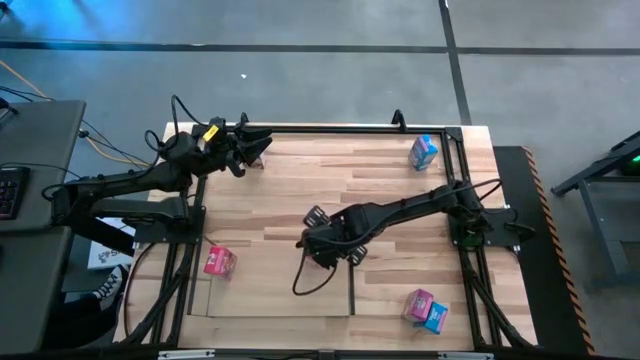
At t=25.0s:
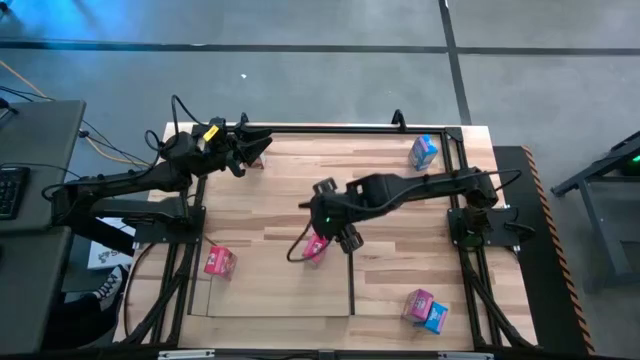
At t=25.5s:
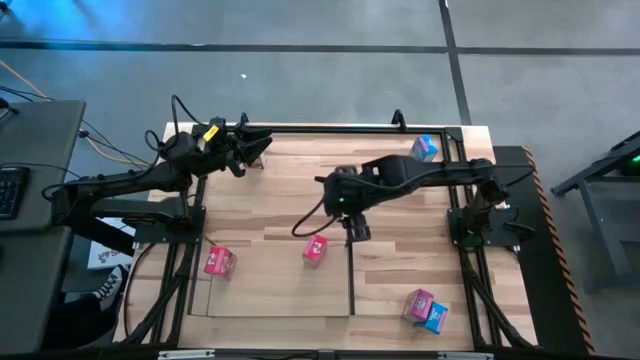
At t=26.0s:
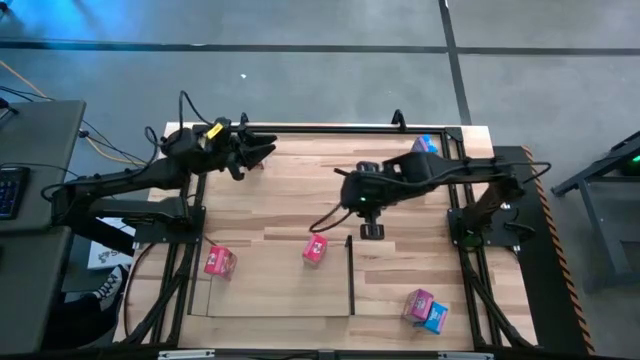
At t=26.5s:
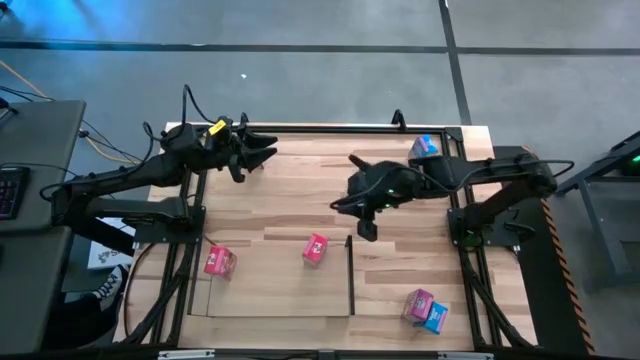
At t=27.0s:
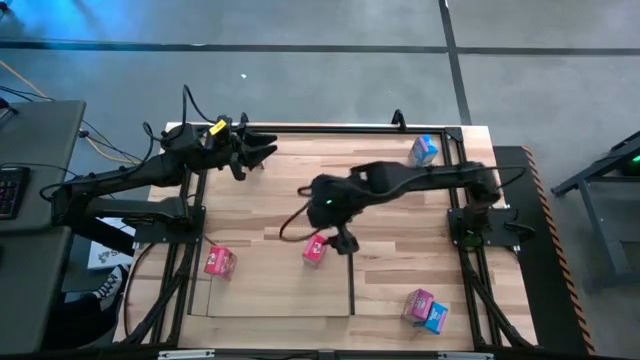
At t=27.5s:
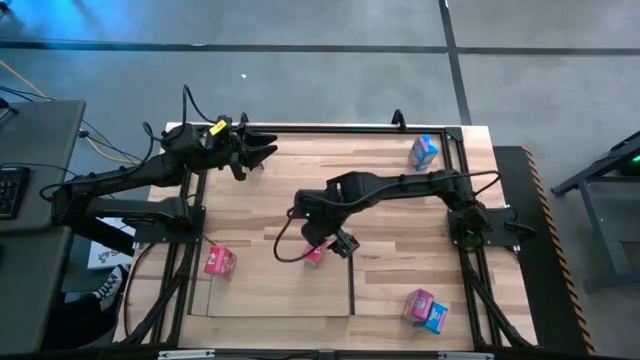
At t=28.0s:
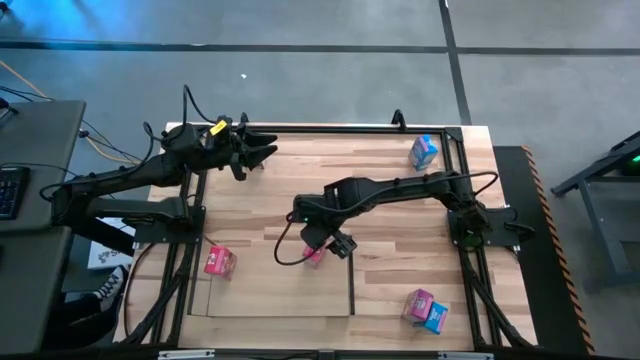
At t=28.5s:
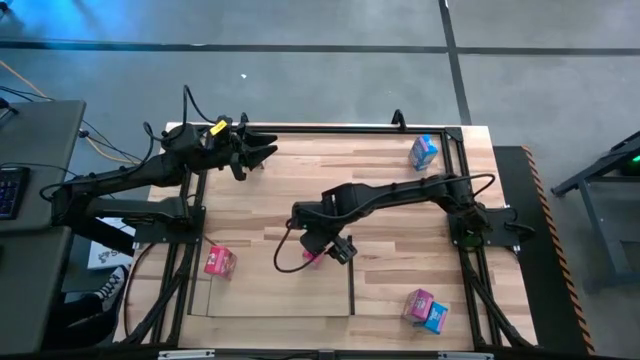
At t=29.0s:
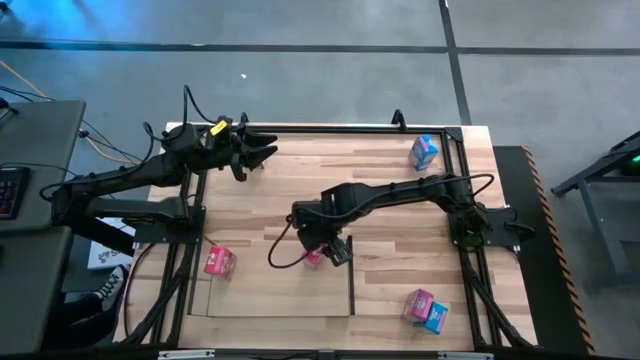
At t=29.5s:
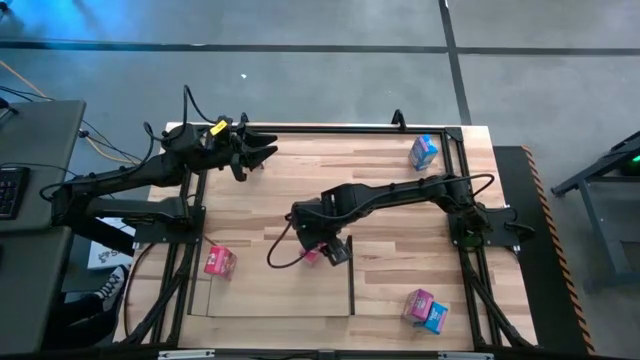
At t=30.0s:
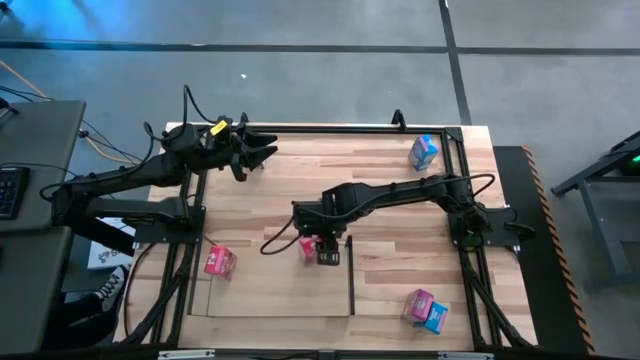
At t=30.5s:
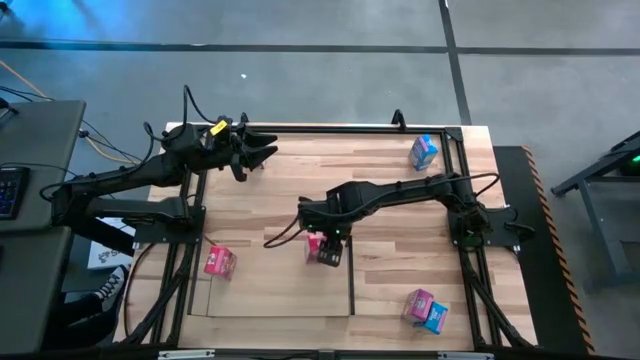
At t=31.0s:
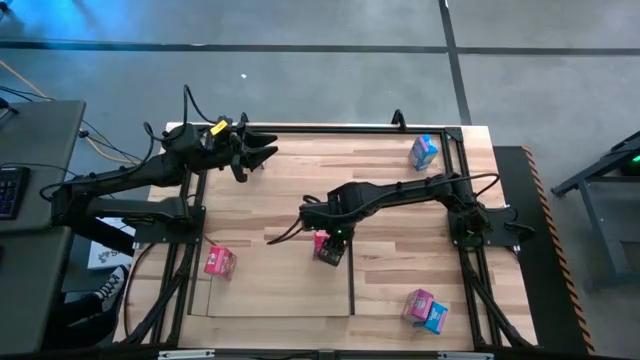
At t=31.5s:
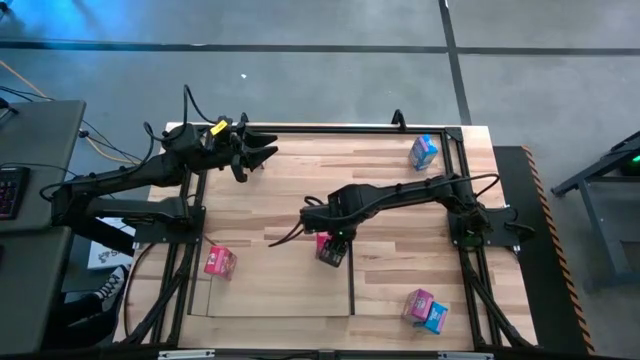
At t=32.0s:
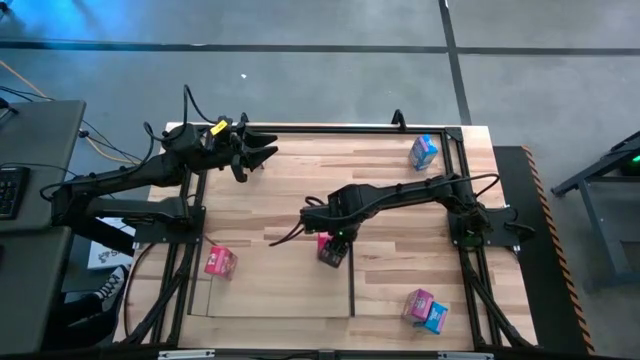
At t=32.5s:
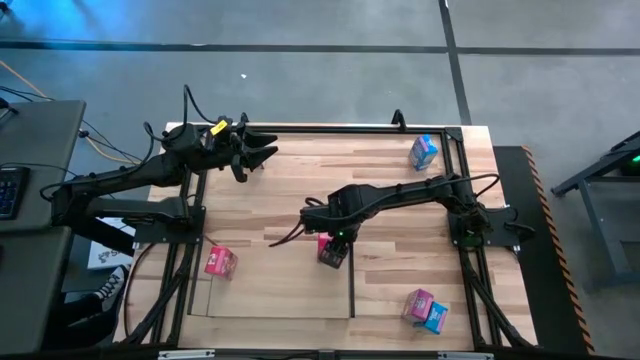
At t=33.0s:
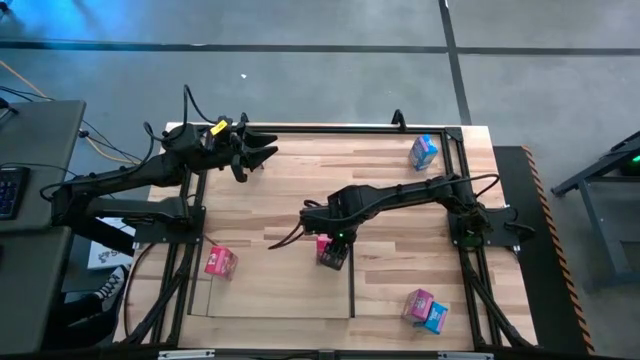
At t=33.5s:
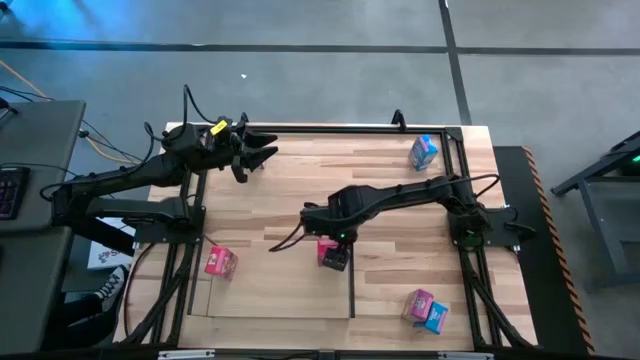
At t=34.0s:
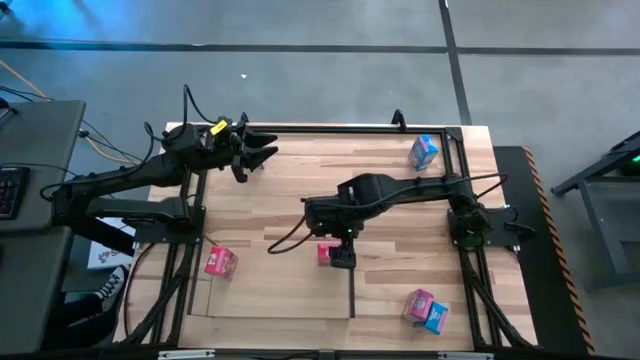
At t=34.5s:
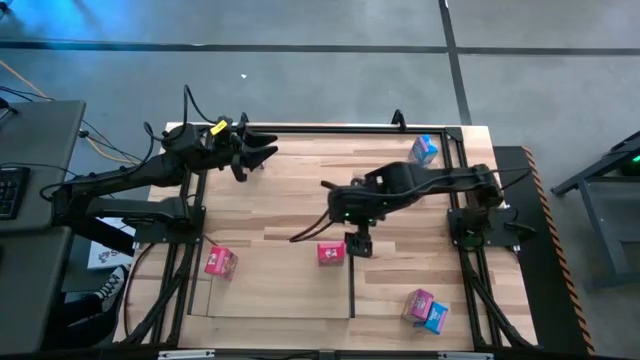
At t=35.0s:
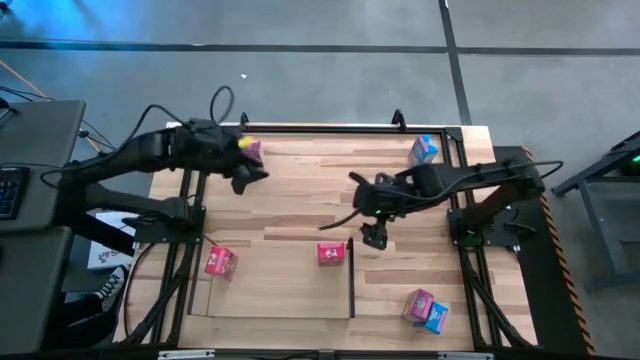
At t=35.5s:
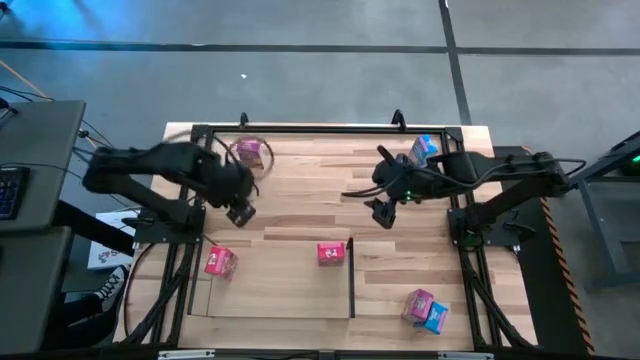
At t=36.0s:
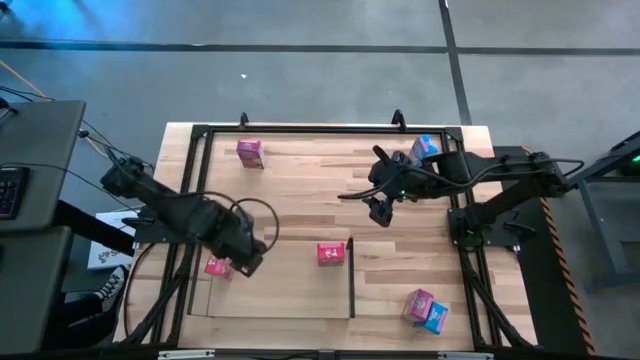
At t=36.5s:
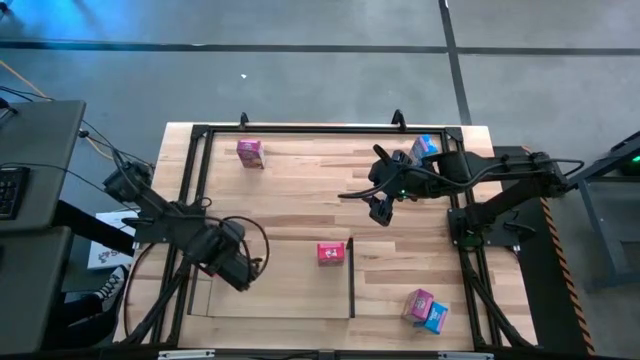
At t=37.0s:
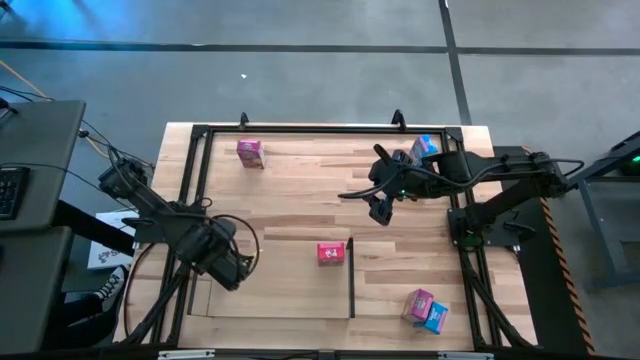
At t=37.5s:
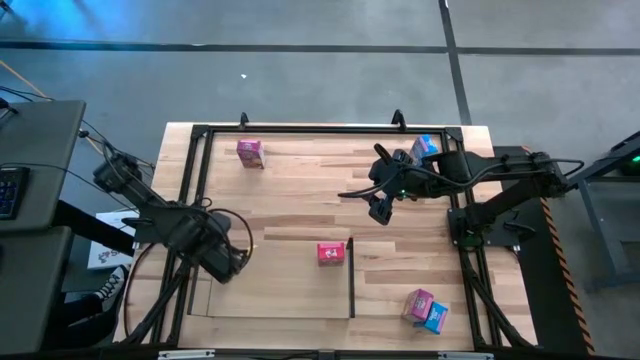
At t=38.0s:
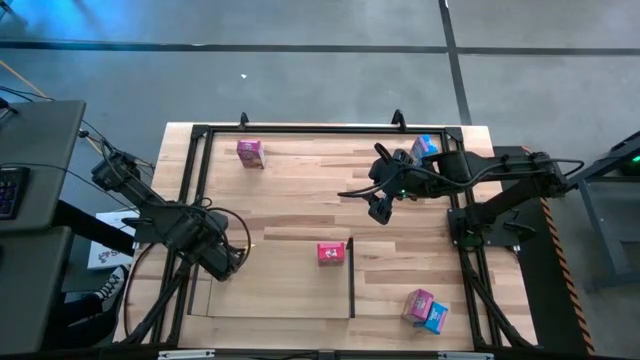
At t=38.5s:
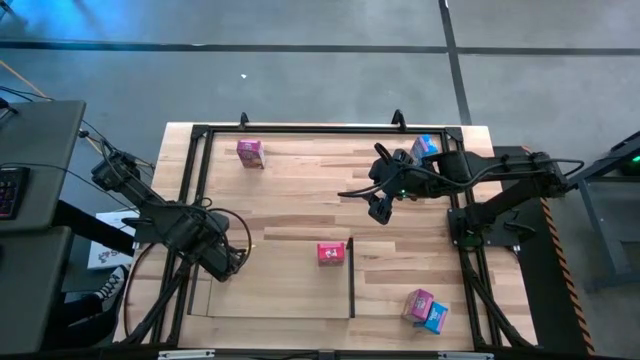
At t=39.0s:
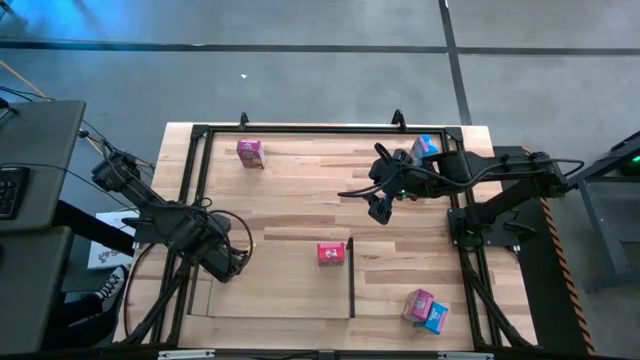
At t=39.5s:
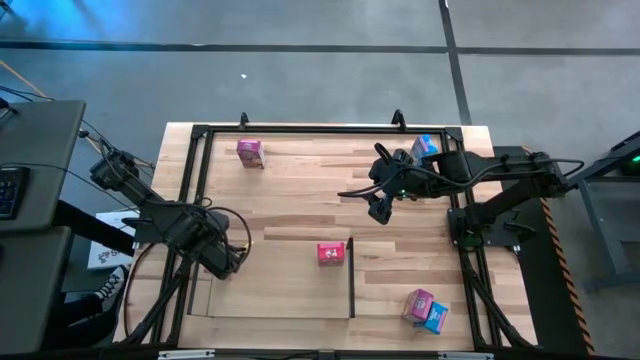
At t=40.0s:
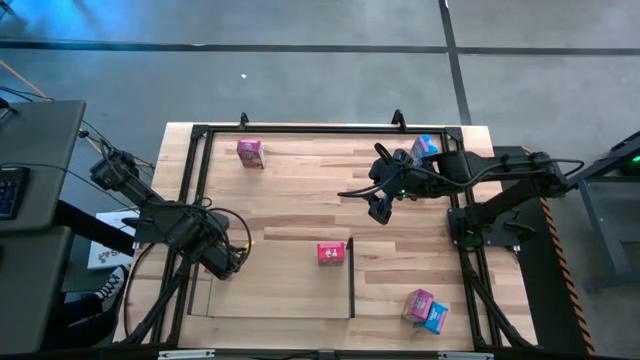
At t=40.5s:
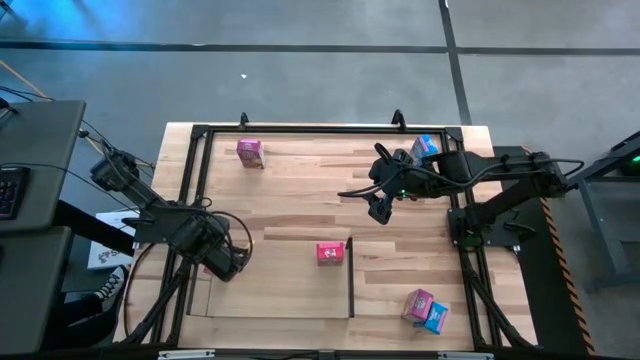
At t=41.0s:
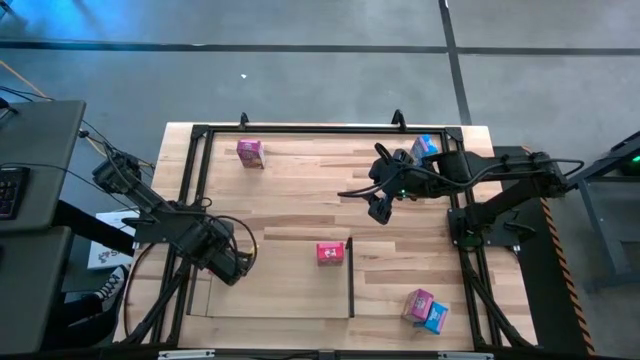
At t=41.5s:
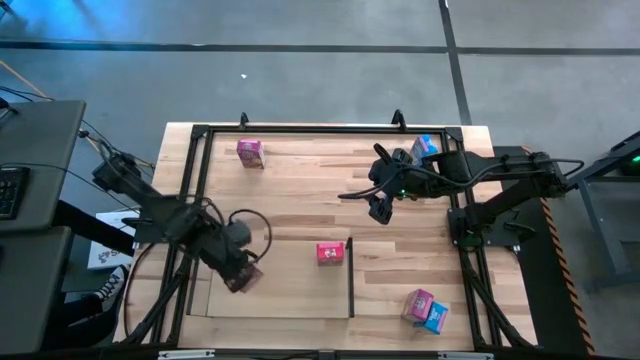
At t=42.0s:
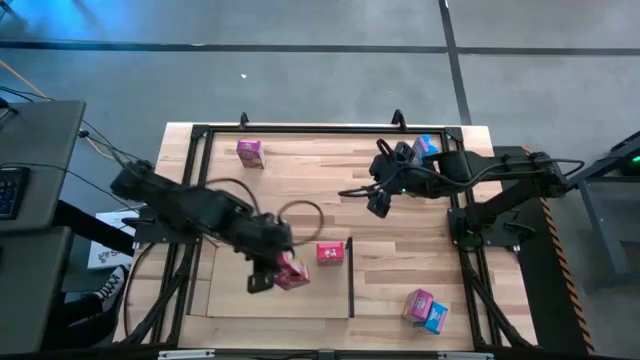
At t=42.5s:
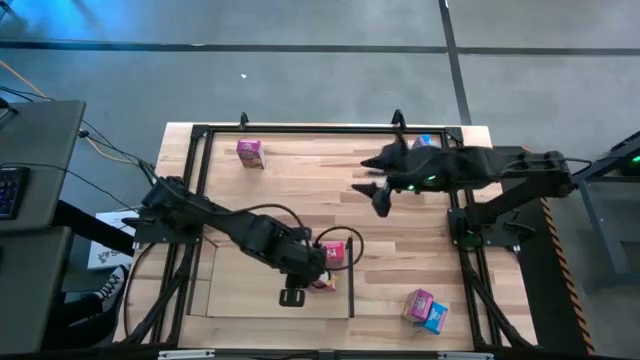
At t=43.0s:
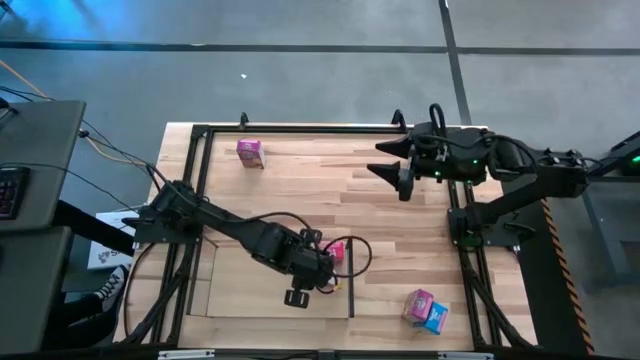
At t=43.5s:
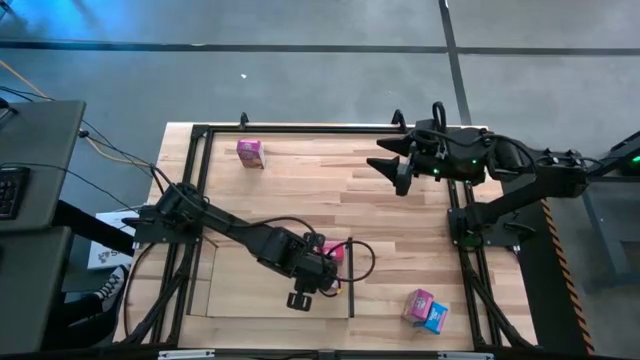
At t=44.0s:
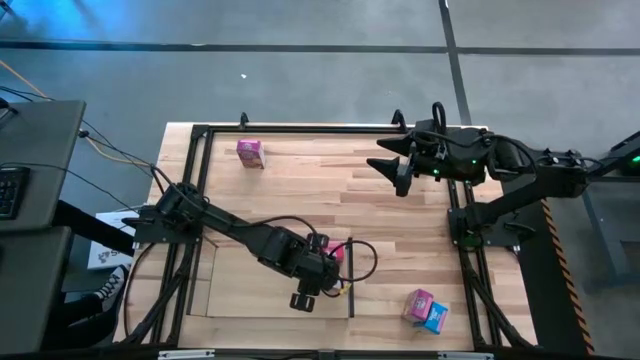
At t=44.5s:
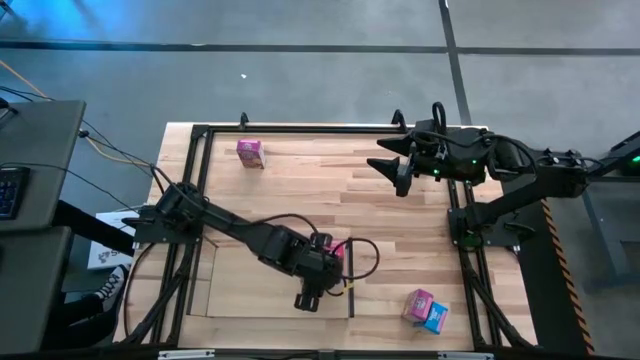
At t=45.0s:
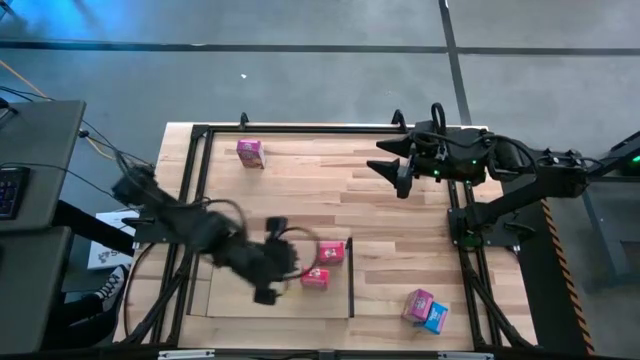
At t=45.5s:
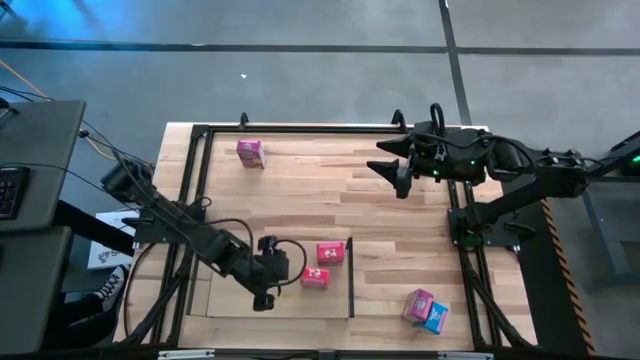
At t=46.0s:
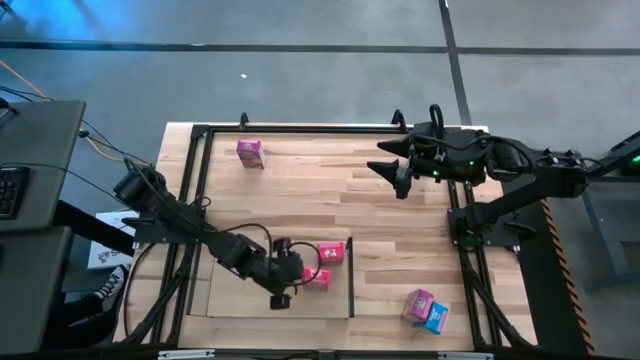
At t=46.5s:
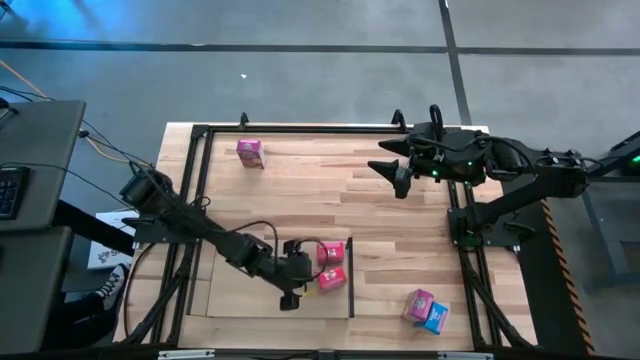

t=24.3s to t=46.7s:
Task: Stack cereal on shelf
Adjust the red cereal boxes on the shelf to be aligned together
